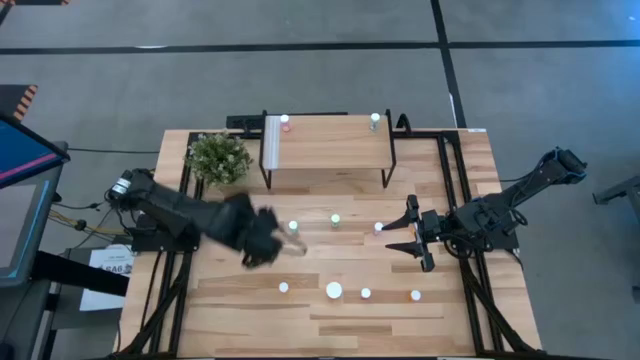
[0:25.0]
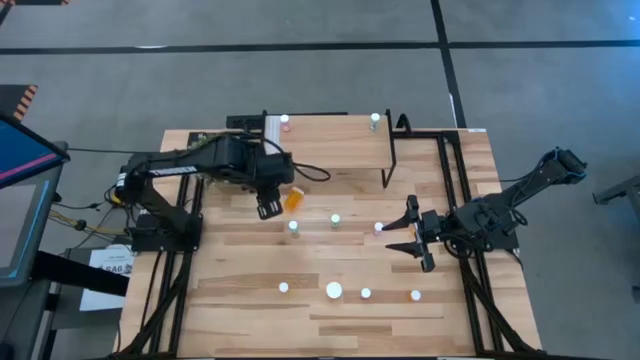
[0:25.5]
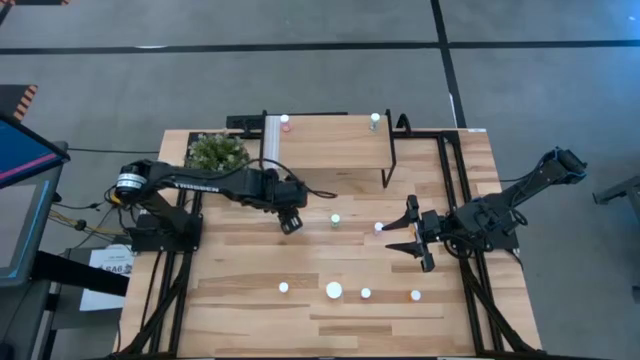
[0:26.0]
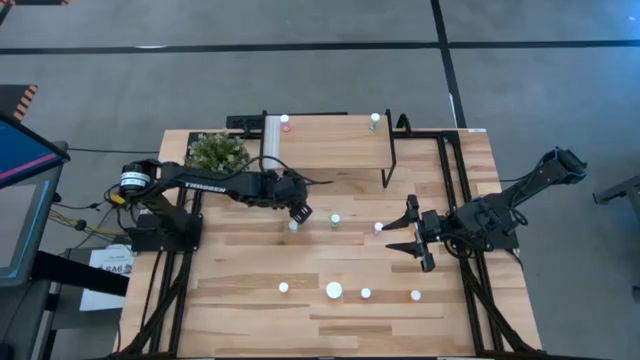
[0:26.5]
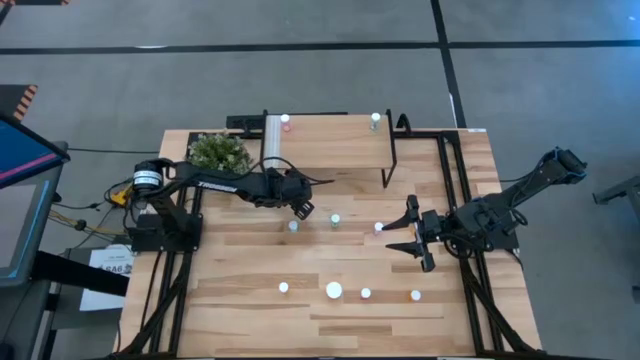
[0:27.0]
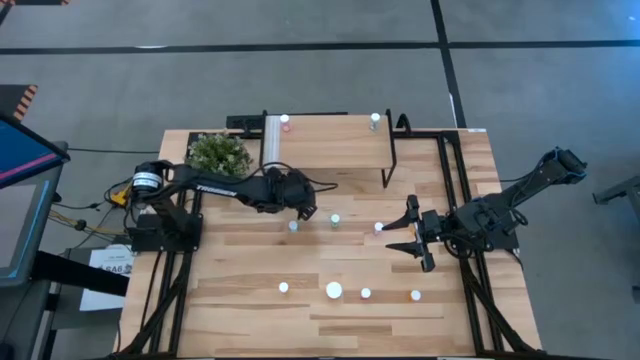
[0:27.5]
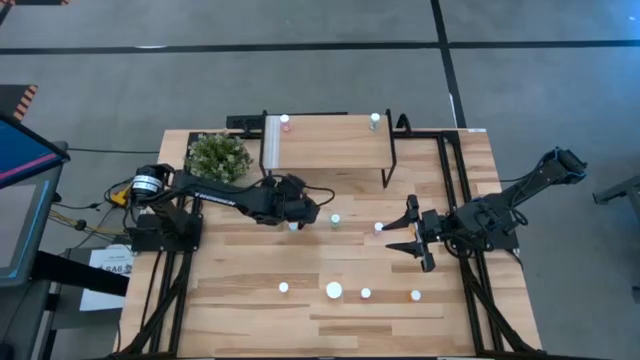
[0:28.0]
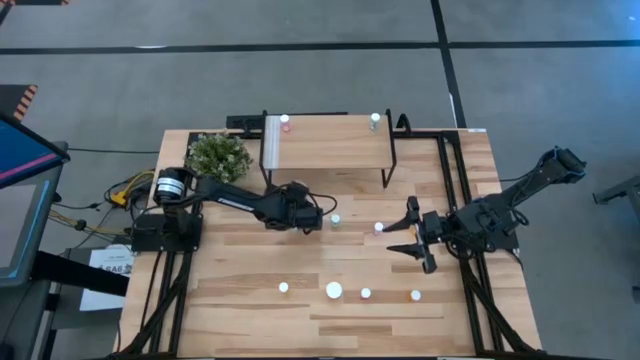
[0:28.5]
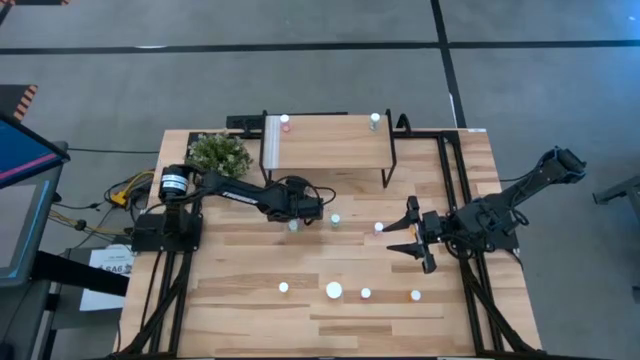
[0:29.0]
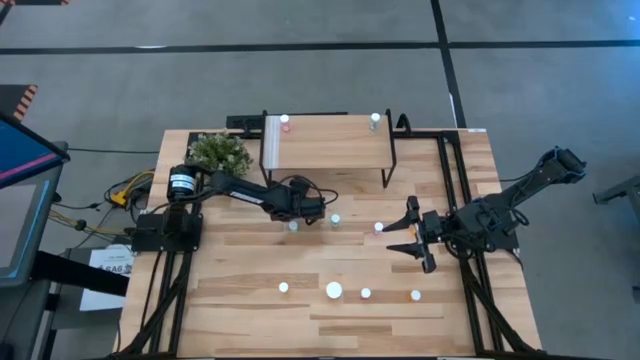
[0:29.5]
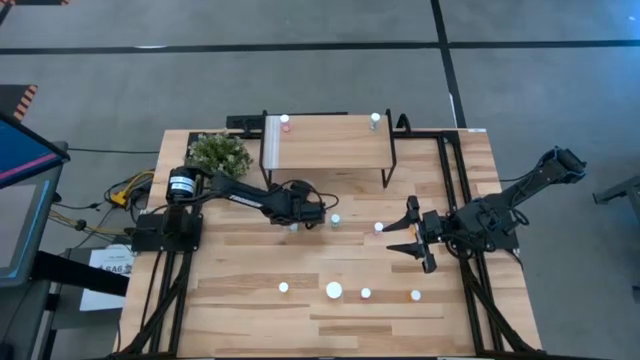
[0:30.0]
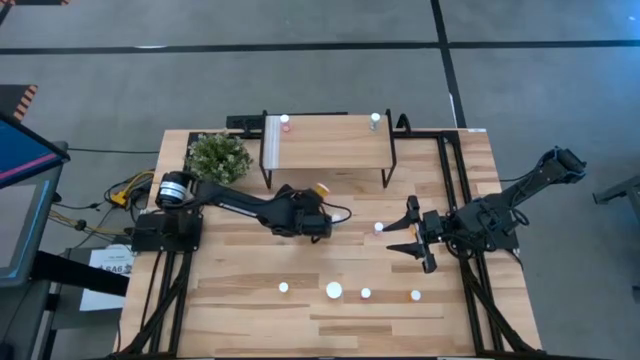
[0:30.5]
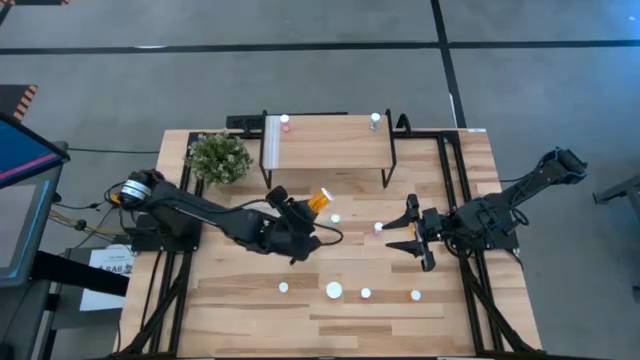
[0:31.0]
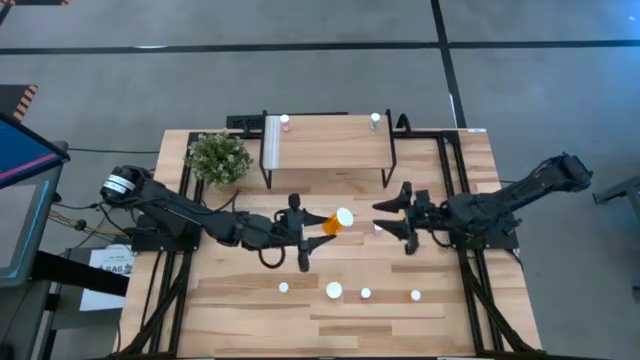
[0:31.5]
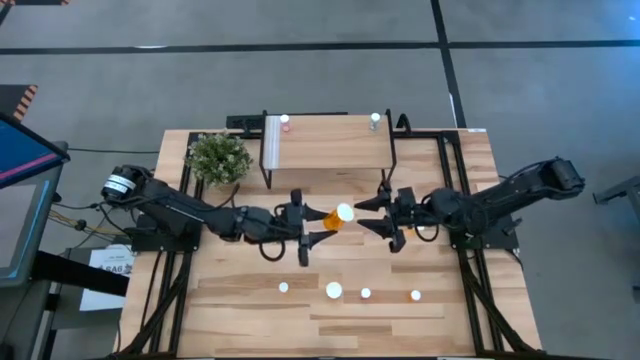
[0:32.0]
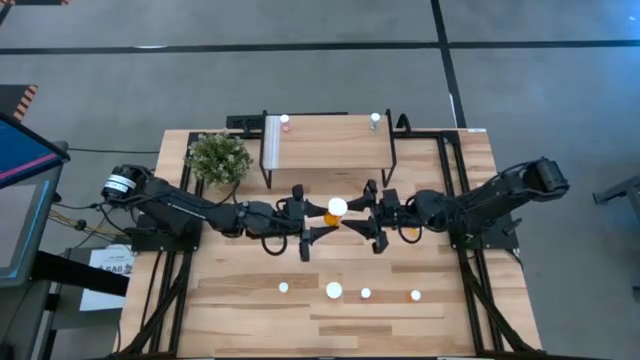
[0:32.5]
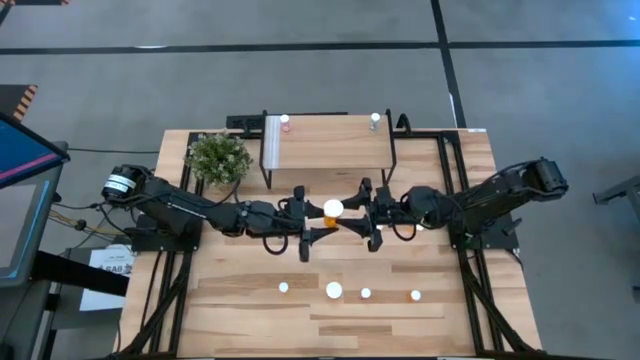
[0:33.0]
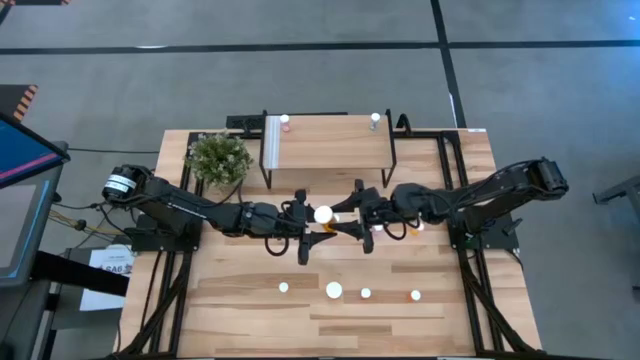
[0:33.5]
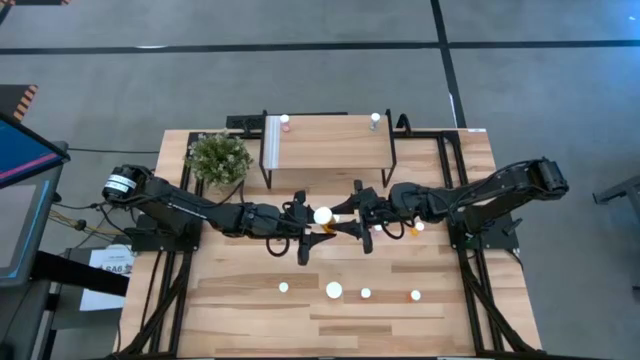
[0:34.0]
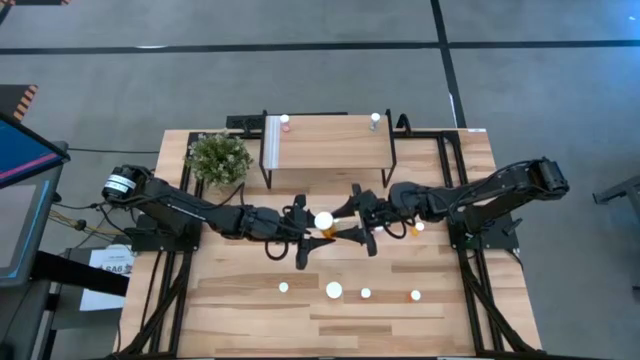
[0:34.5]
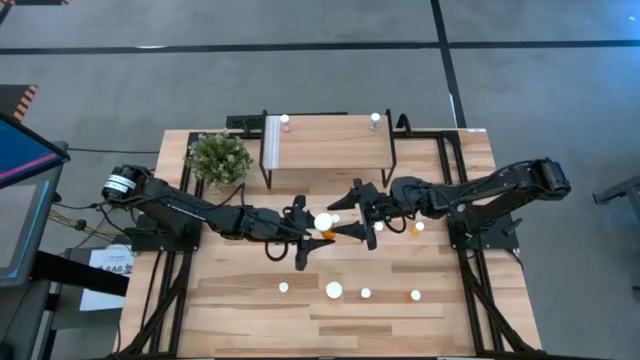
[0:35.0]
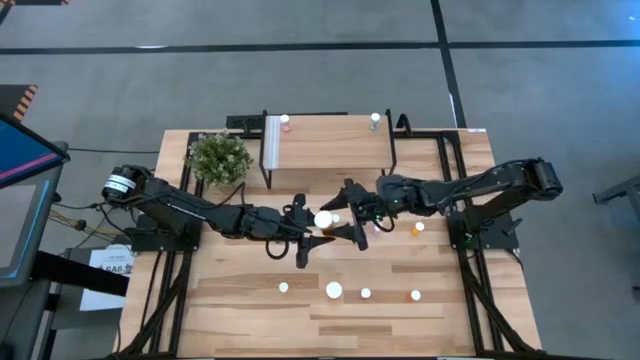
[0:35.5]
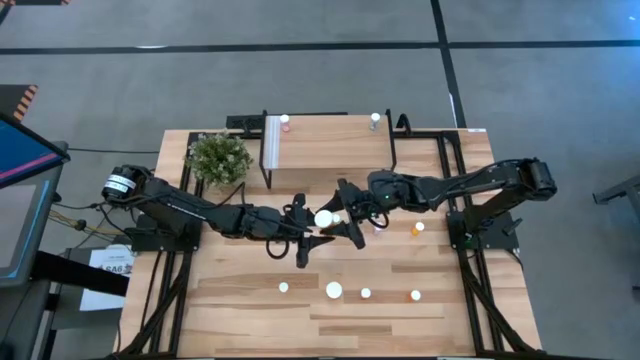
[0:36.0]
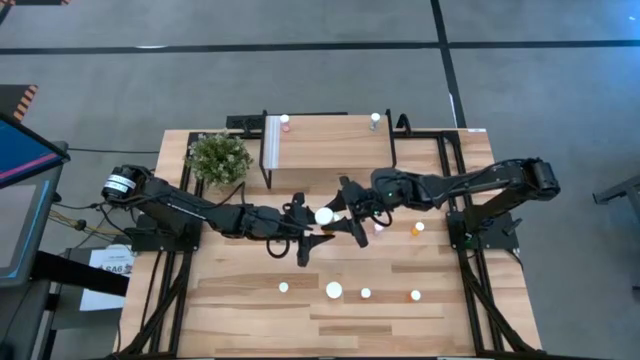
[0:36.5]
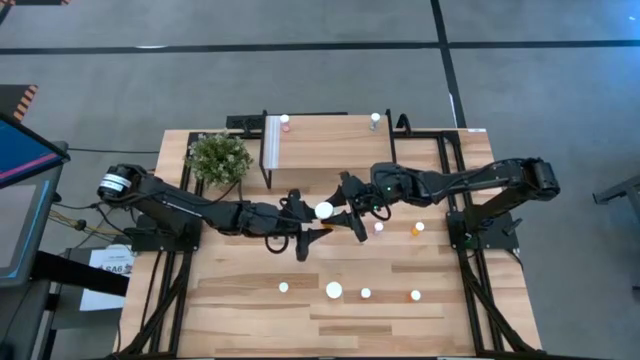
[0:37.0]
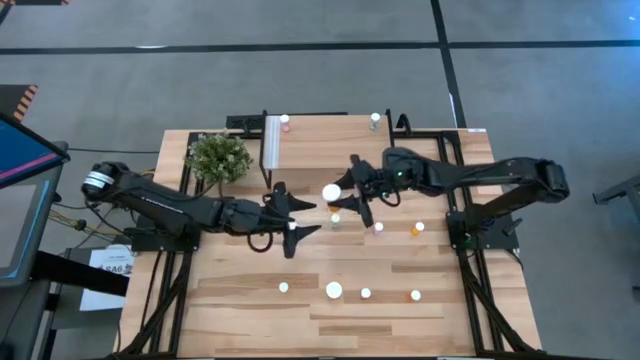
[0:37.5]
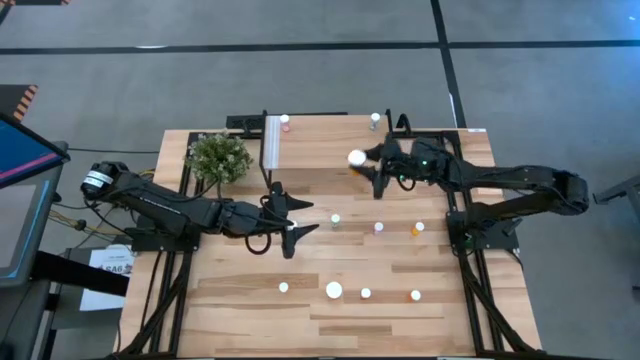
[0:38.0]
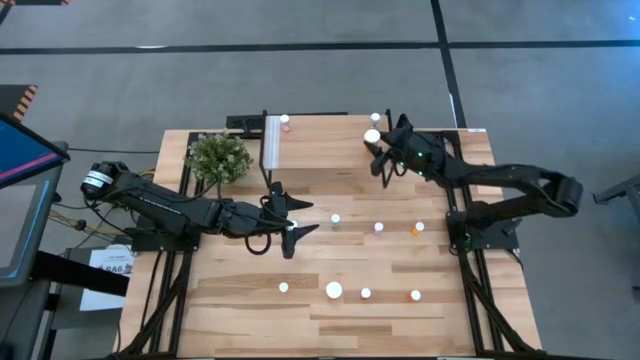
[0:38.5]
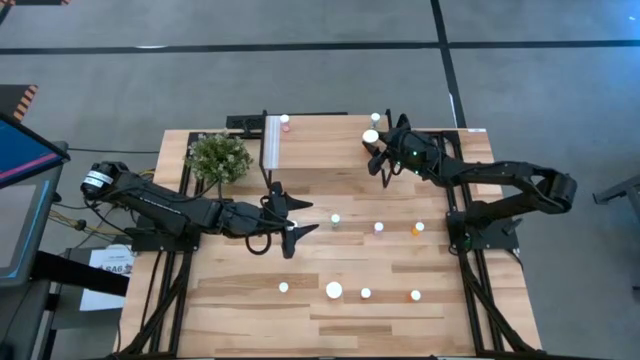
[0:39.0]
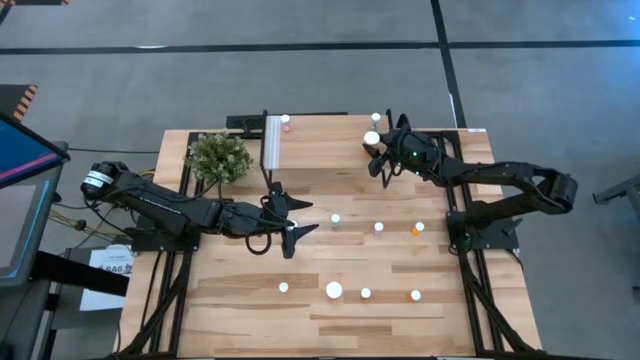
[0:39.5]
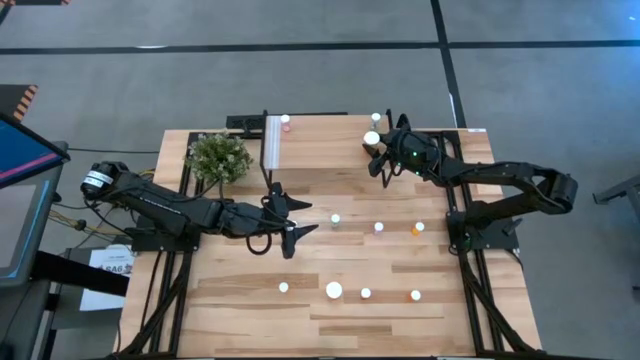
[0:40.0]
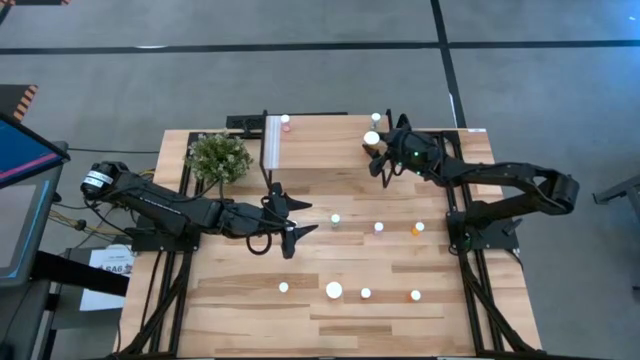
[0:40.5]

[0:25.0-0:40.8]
Task: Pick and place medicine bottles onto shelf by color
Put the top big orange pill bottle on the shelf

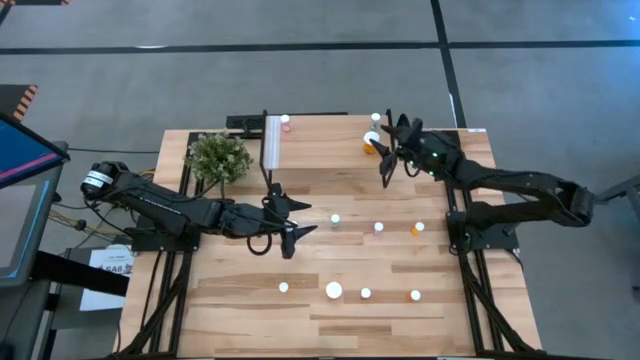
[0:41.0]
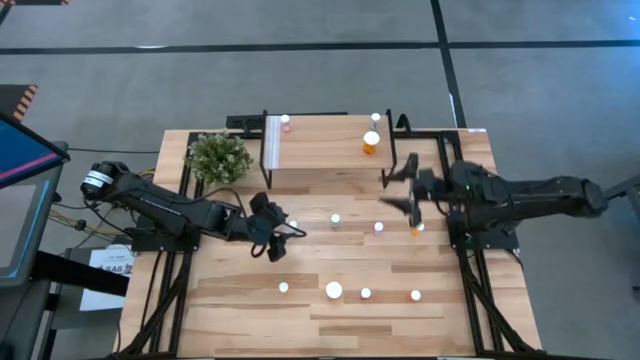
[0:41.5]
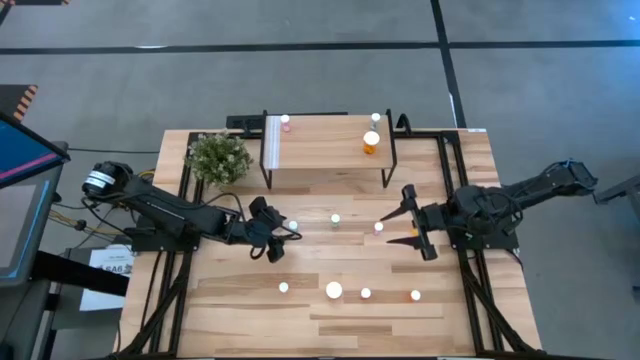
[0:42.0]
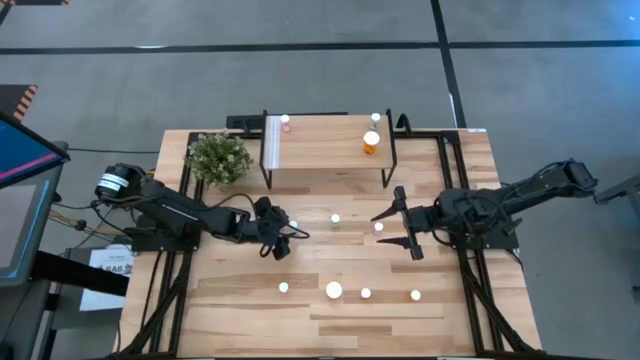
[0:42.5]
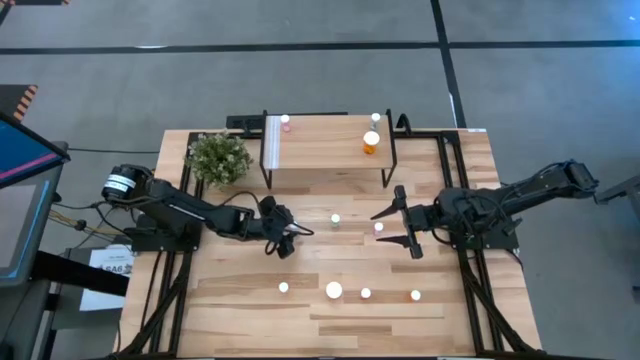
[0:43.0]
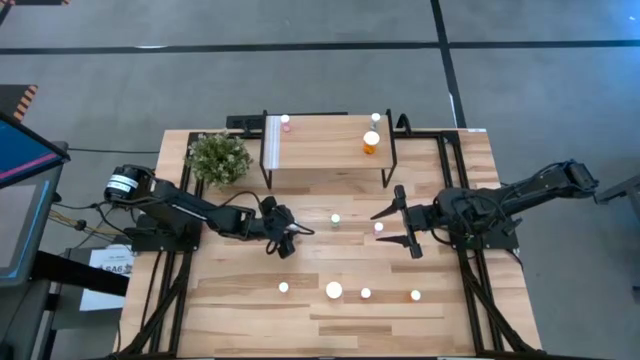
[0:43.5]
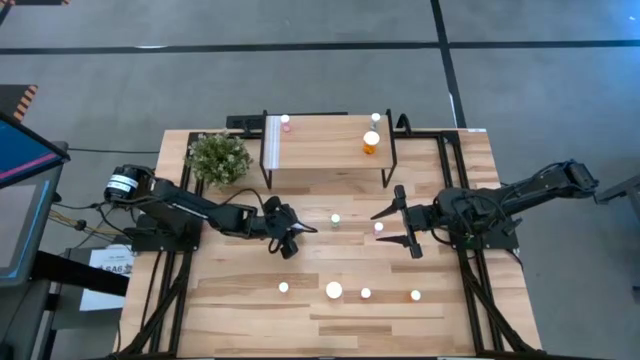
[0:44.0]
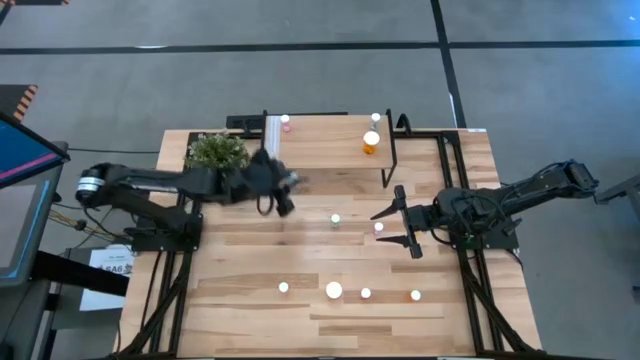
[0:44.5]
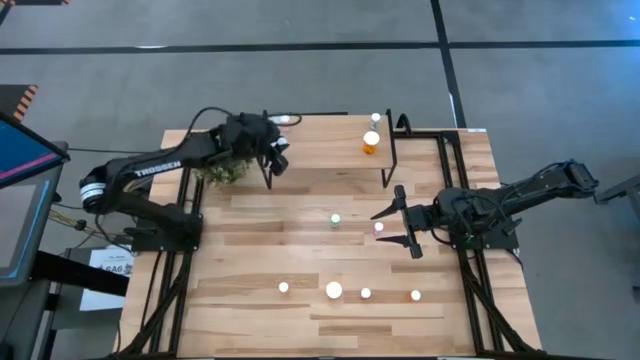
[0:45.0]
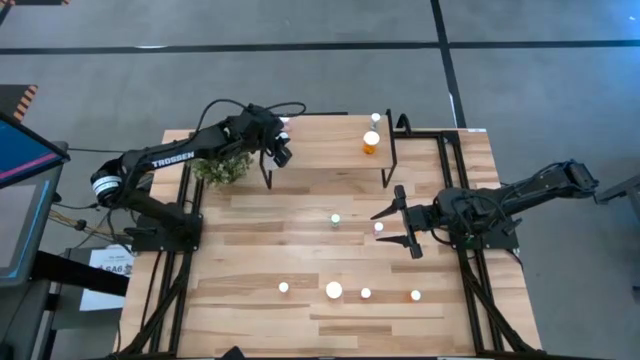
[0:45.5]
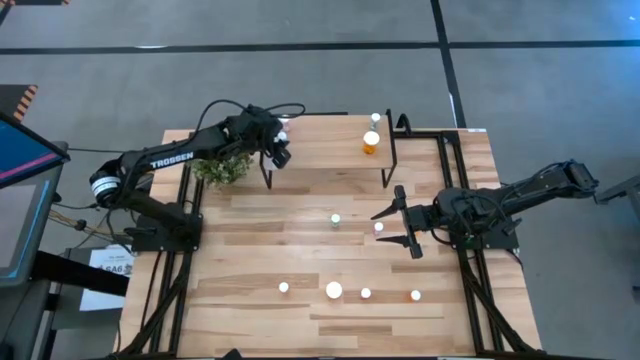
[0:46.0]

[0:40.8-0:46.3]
Put the left blue pill bottle on the shelf

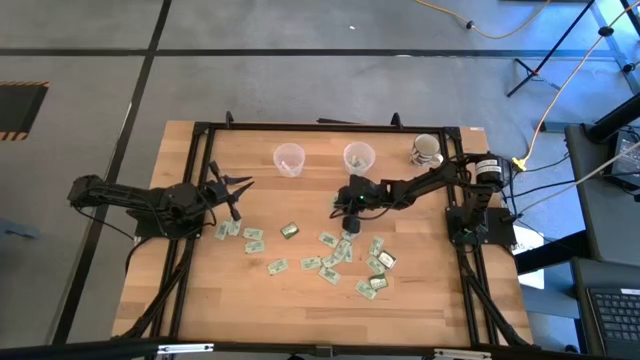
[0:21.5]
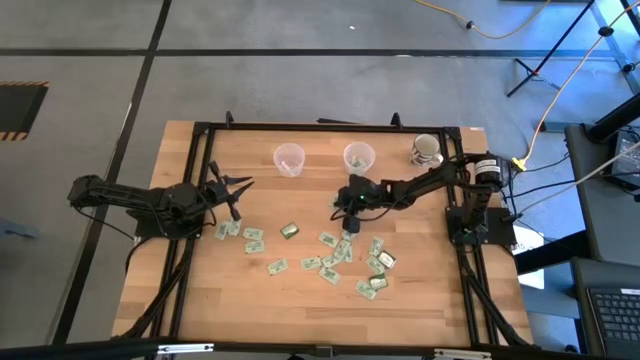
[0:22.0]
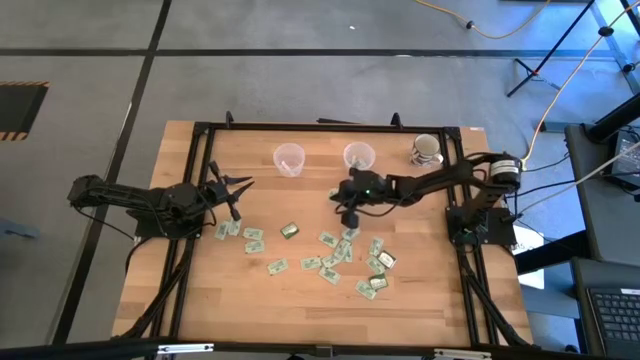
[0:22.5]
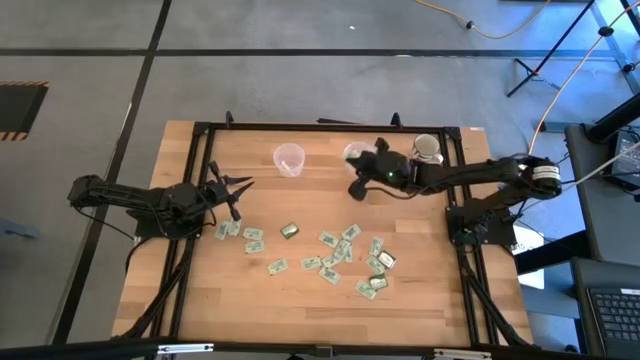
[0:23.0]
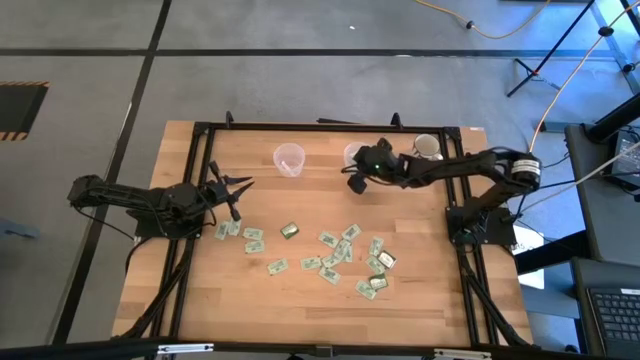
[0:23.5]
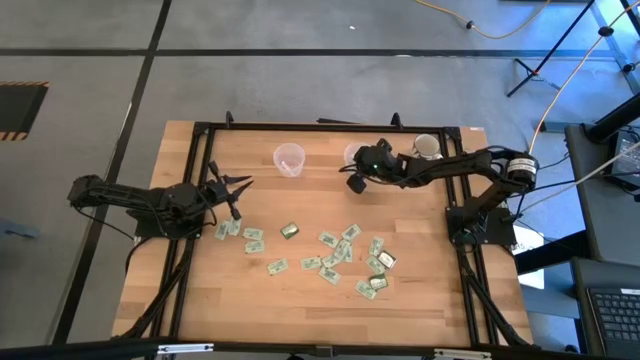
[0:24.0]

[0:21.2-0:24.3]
Task: Pick and place Stevia / Truvia into bins
Put the stevia packet into the right transparent container
